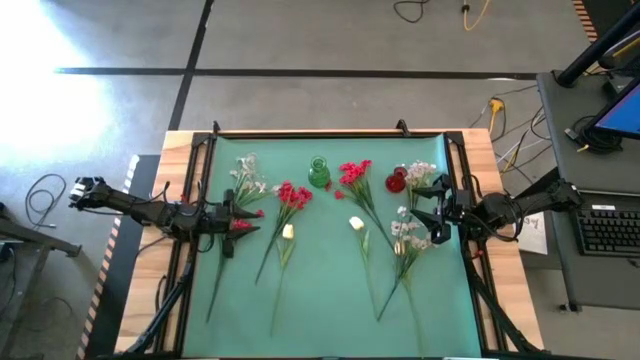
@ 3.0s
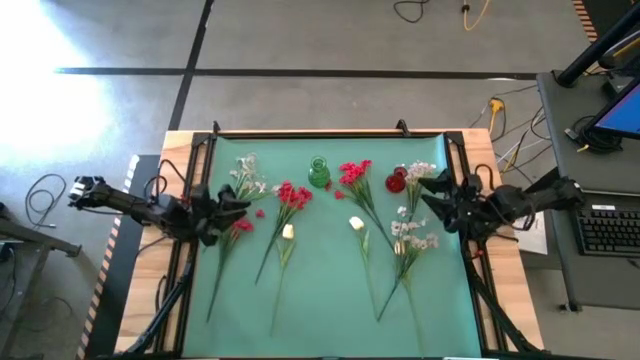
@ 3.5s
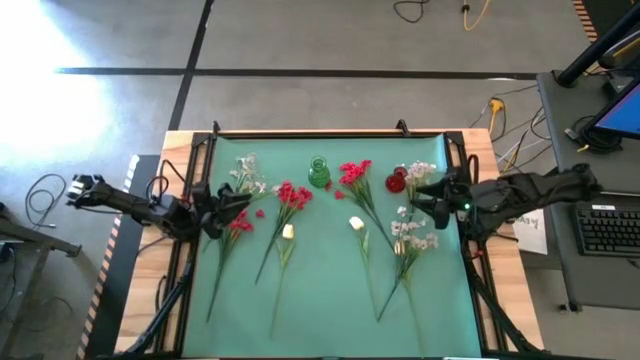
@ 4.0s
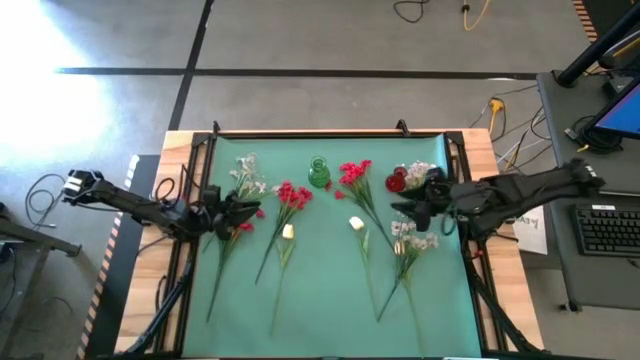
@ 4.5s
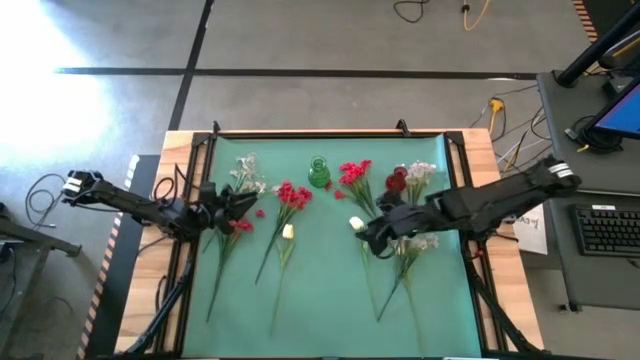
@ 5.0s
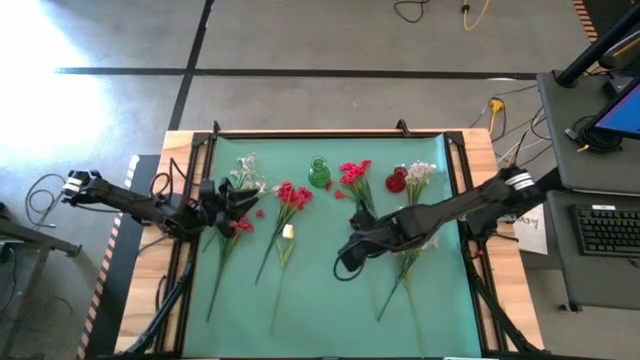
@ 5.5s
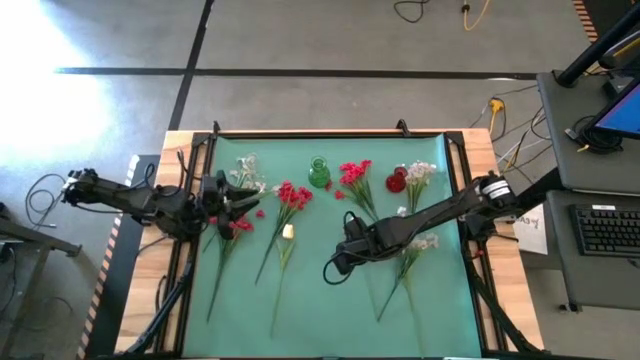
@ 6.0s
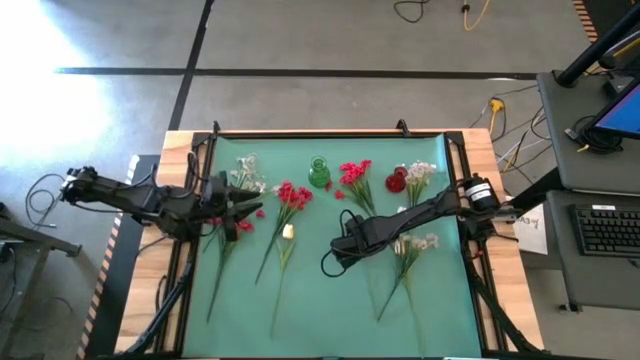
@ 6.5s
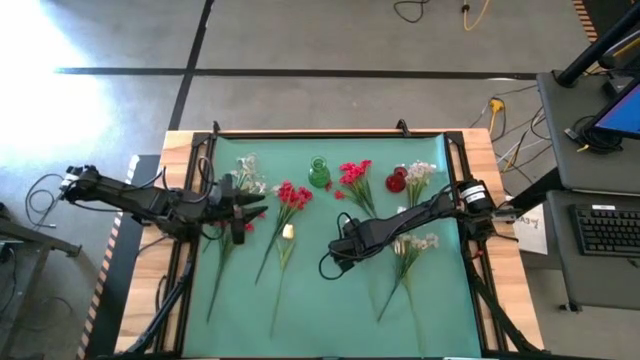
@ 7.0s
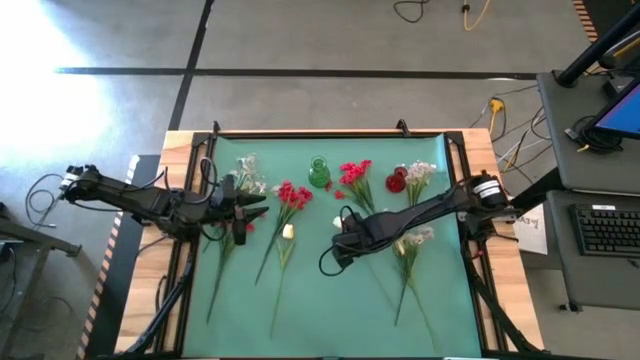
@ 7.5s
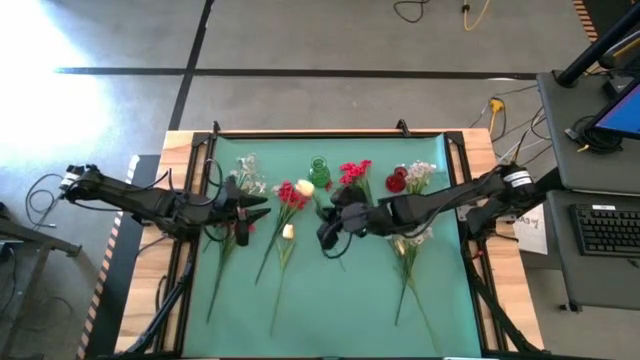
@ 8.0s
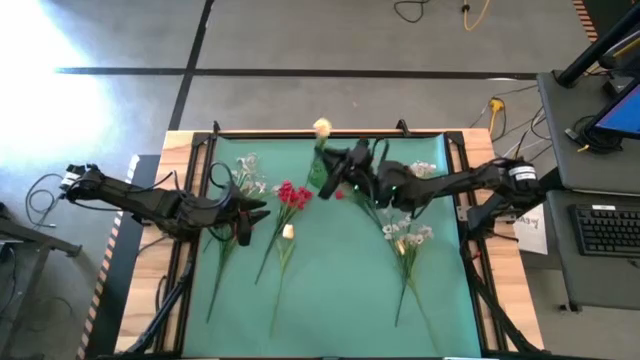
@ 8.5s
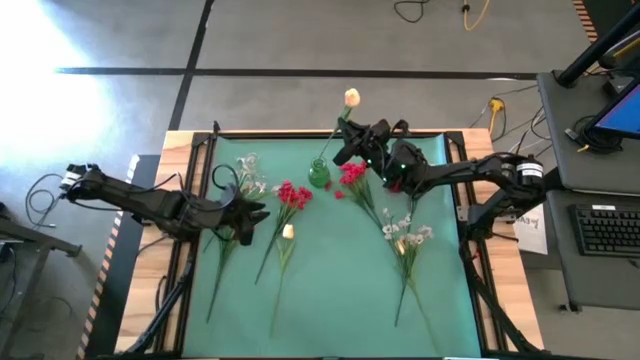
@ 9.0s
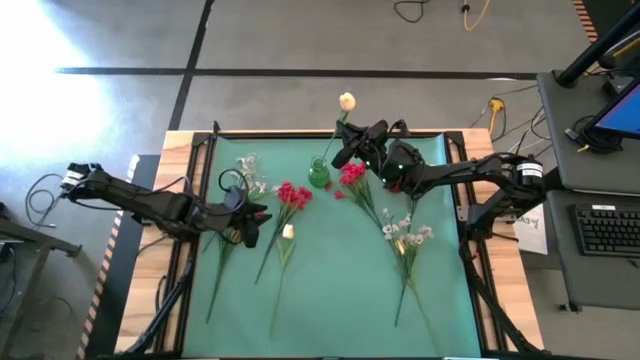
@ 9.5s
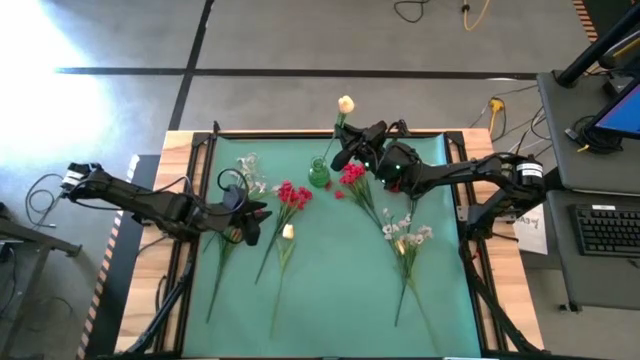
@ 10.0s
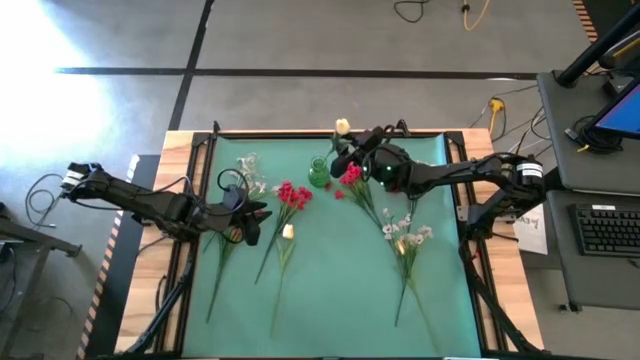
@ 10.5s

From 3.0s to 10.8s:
Task: Sort flowers into vase by color
Put the right white tulip into the green vase

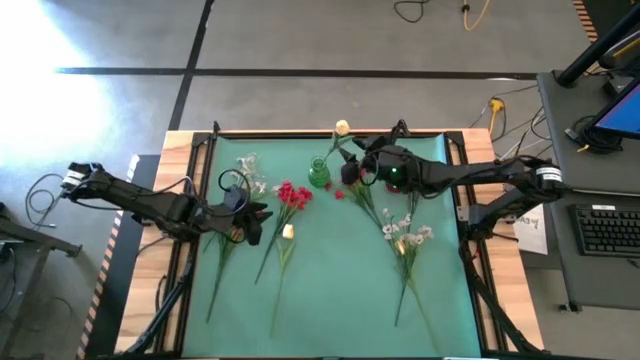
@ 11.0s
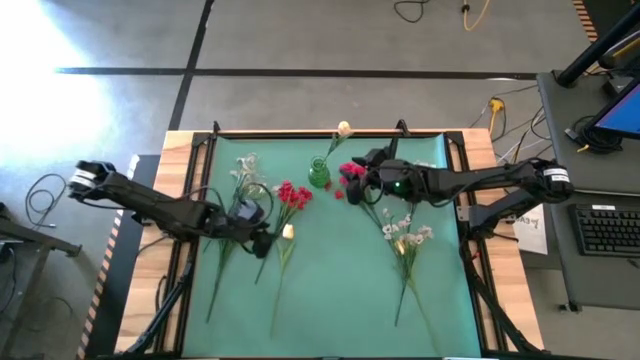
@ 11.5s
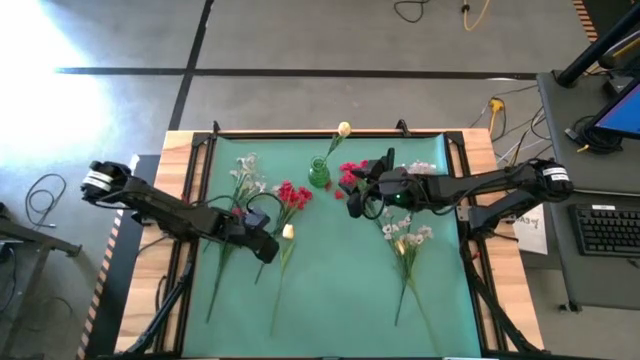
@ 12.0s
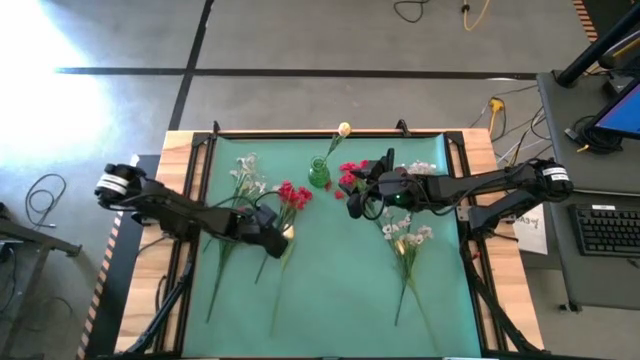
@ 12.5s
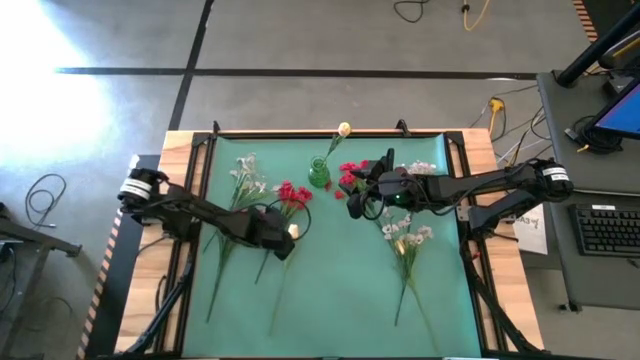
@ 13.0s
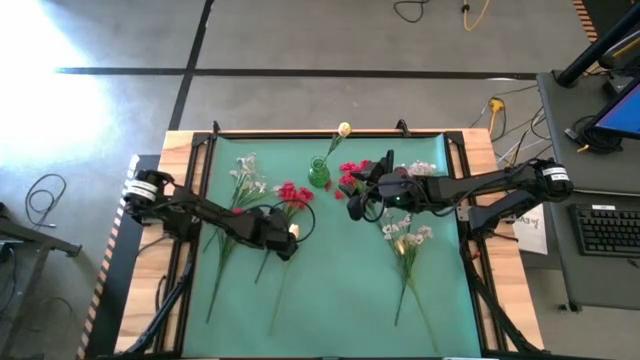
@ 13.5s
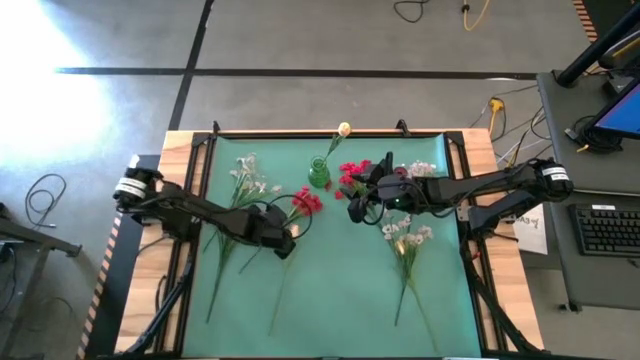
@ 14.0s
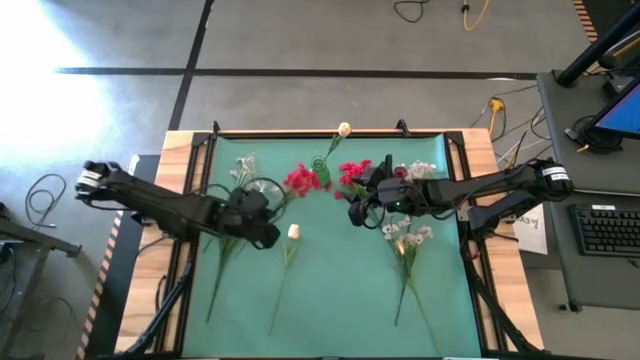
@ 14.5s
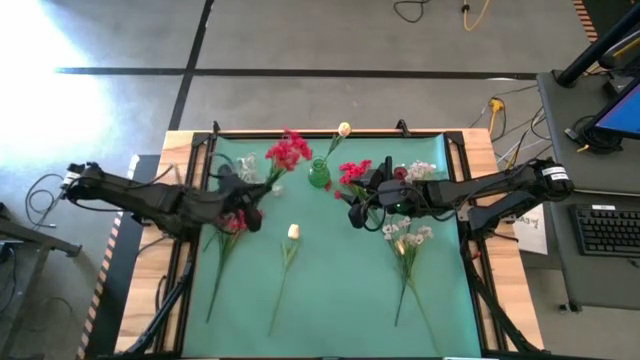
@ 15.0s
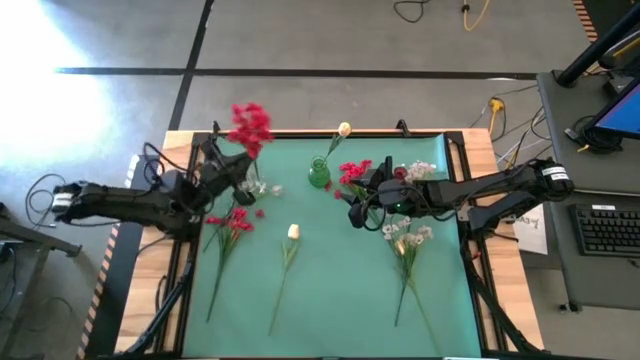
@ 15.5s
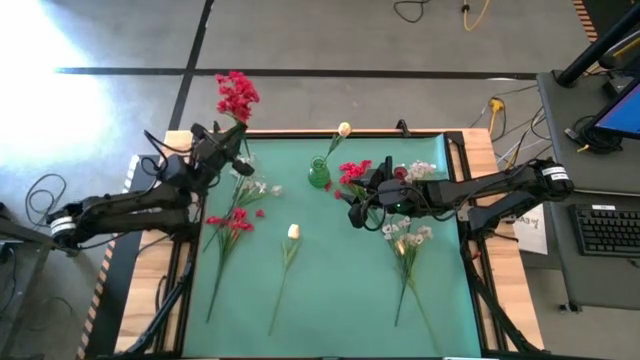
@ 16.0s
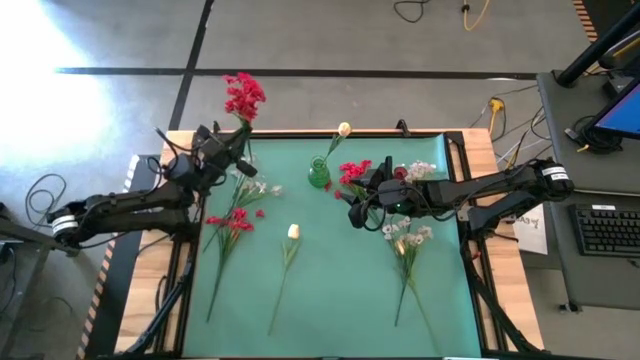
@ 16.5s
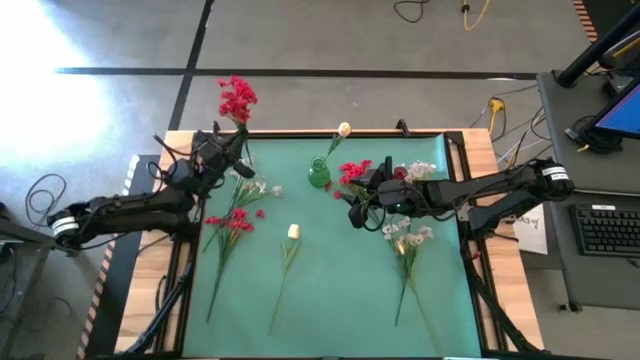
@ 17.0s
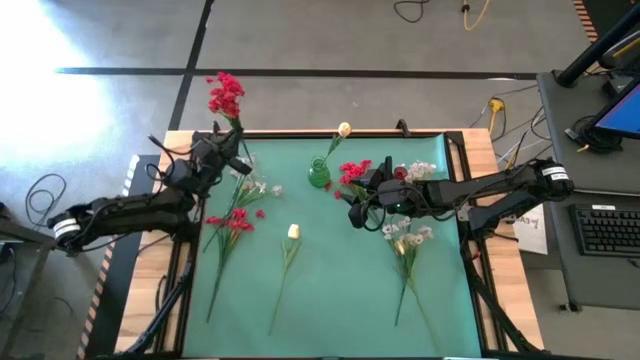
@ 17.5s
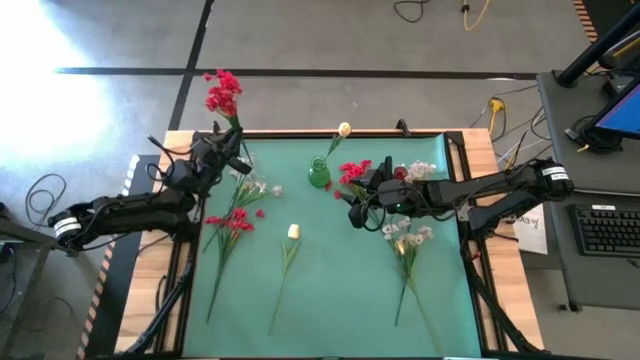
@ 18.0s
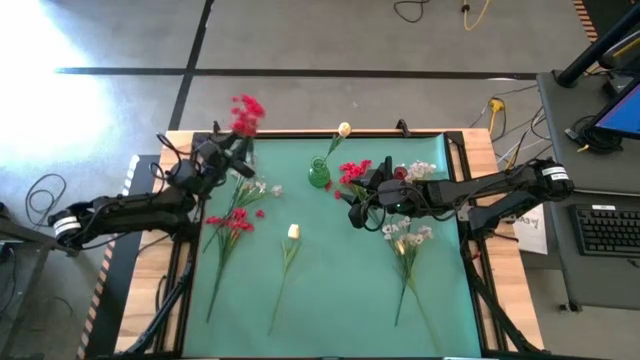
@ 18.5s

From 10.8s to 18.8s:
Put the middle red flowers into the transparent vase

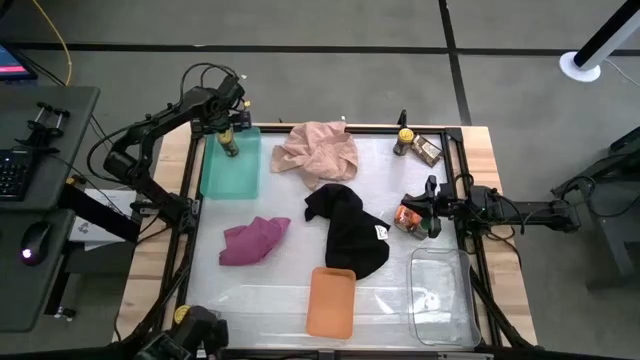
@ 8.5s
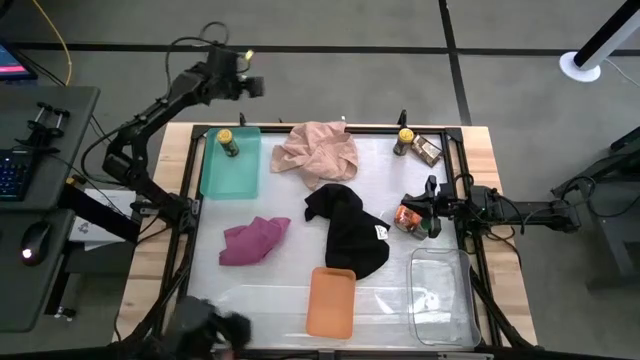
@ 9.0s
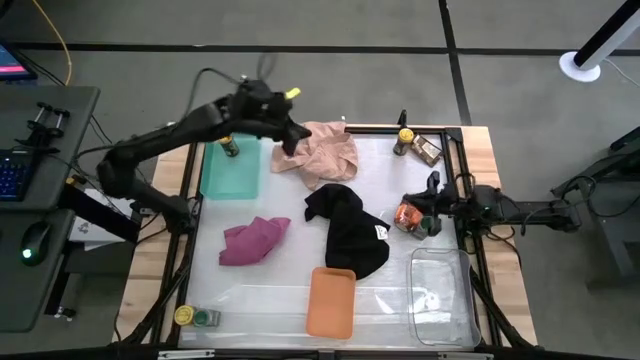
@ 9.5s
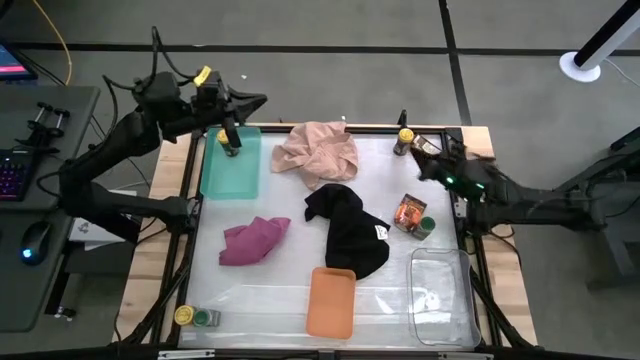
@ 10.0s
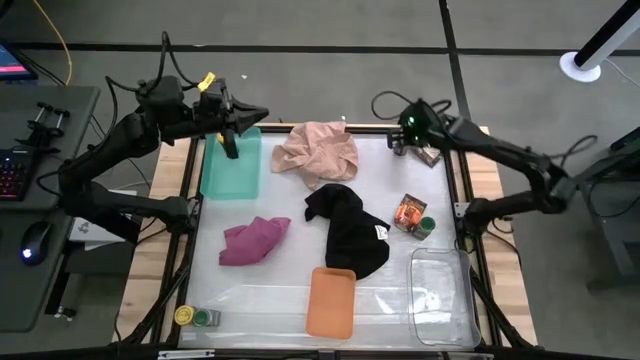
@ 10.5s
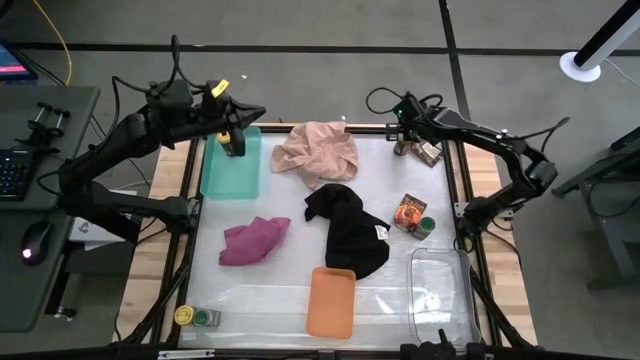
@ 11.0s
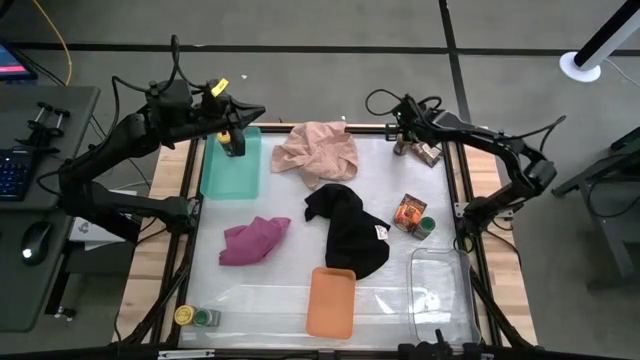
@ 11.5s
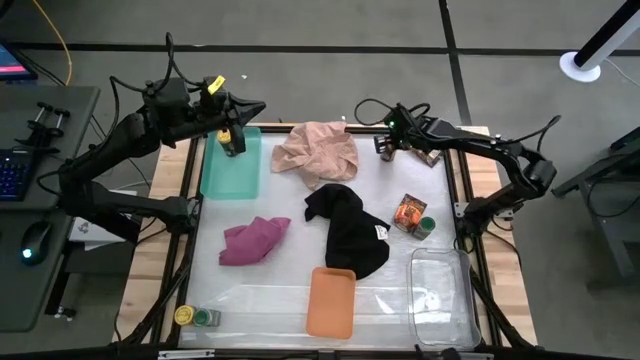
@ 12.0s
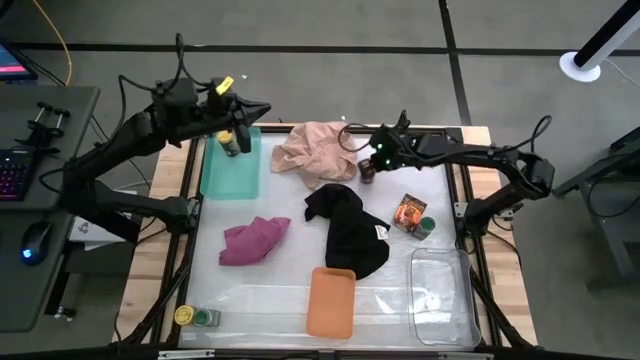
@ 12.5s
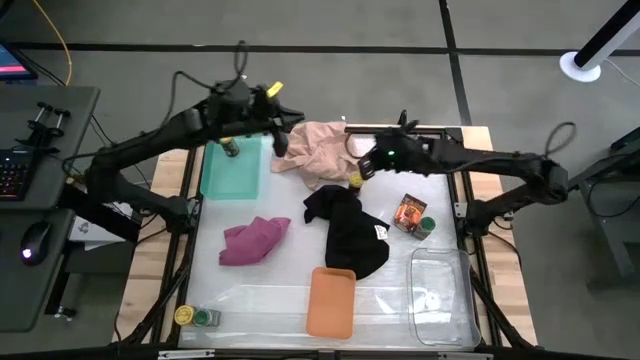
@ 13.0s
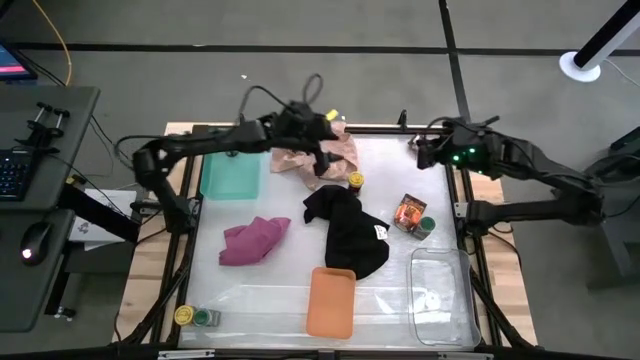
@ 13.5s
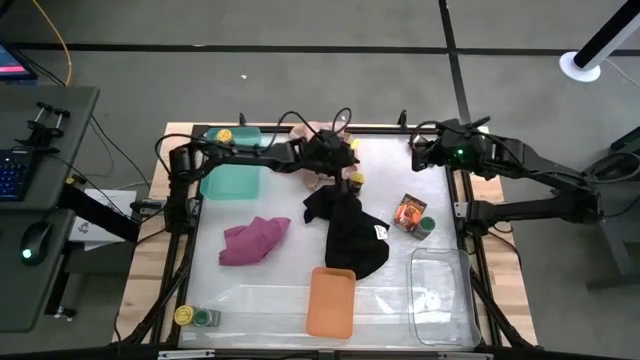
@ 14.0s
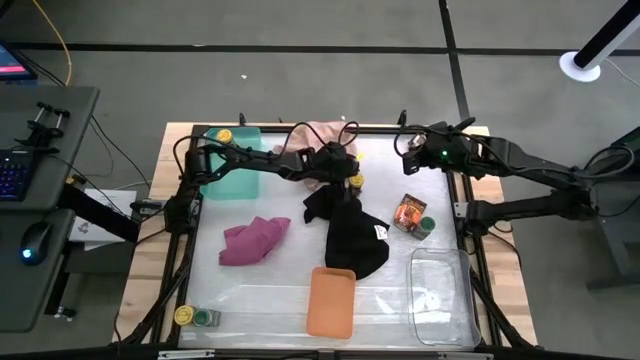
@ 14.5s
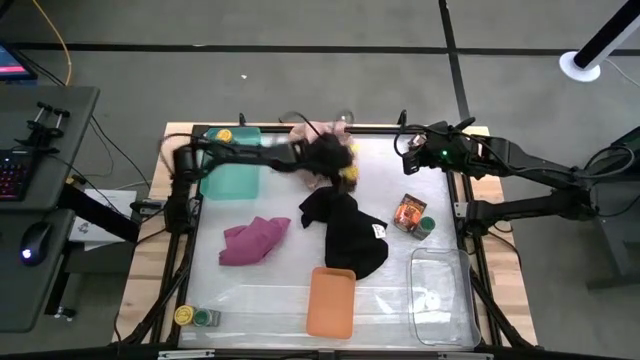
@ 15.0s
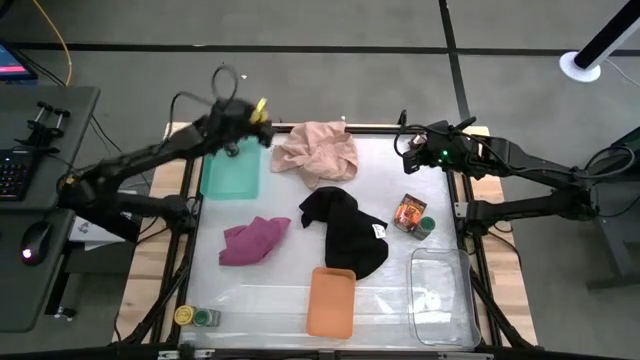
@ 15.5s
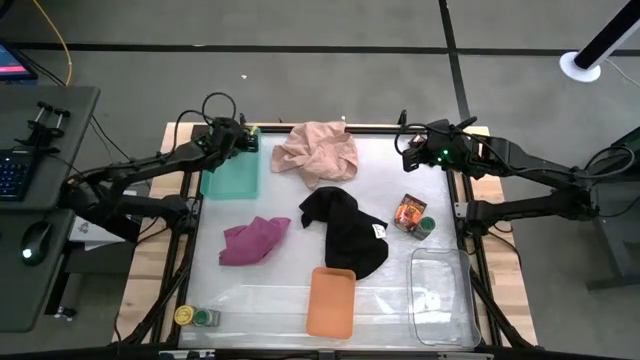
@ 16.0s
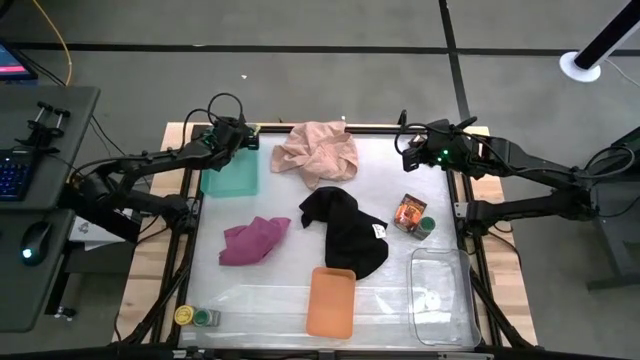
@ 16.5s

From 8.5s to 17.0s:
Task: Sort spices by type
Put the right yellow seasoning bottle into the green bin
